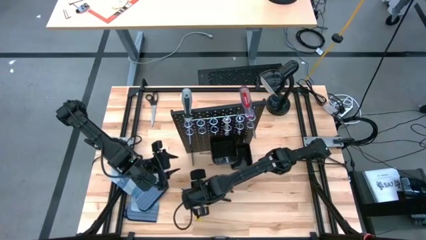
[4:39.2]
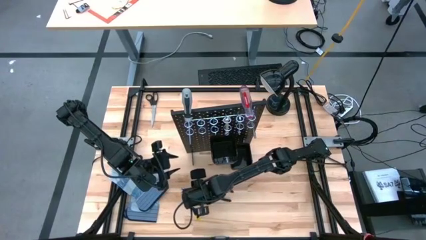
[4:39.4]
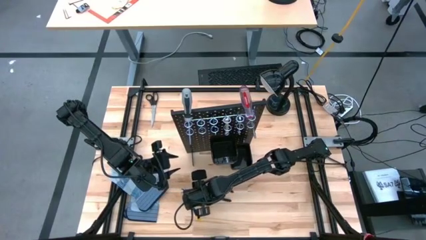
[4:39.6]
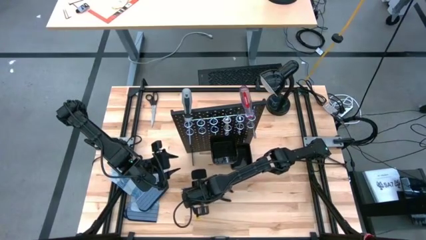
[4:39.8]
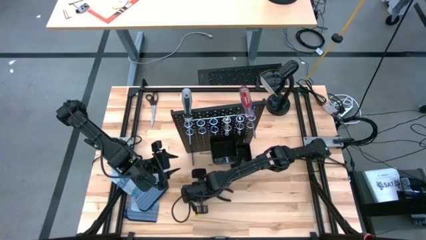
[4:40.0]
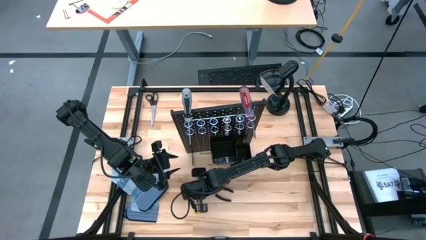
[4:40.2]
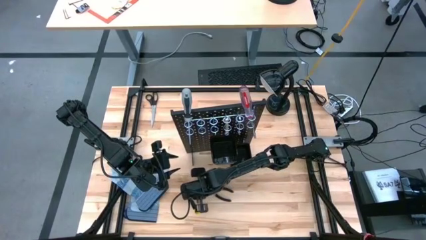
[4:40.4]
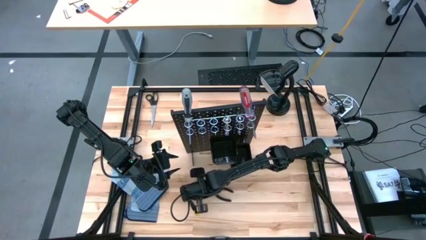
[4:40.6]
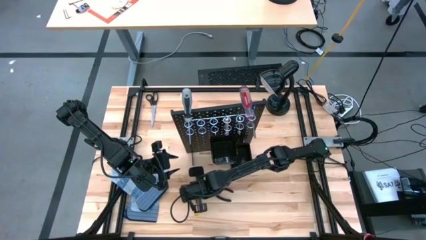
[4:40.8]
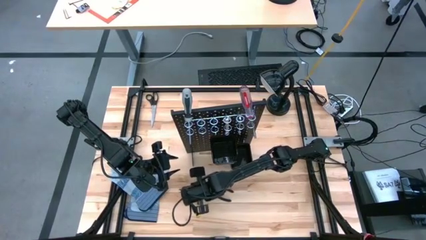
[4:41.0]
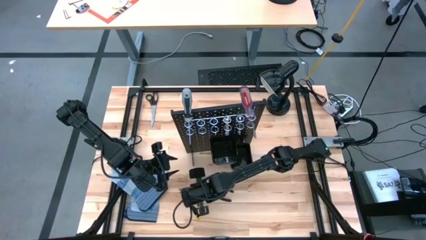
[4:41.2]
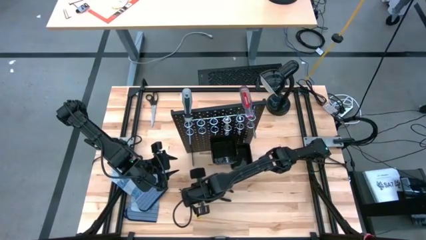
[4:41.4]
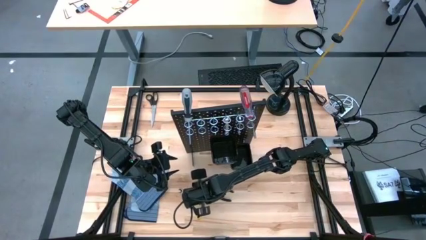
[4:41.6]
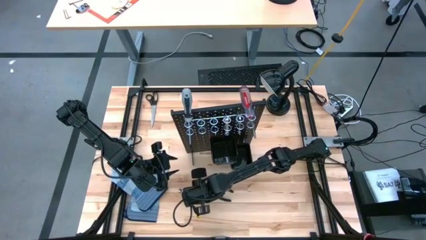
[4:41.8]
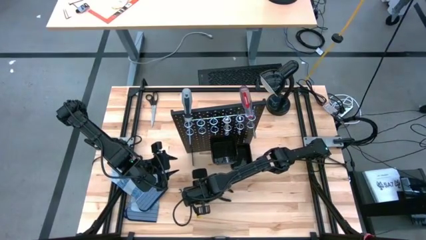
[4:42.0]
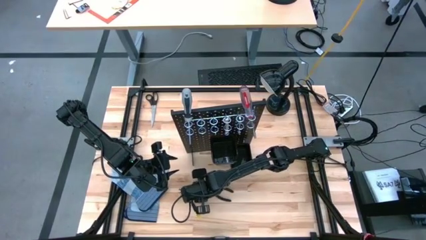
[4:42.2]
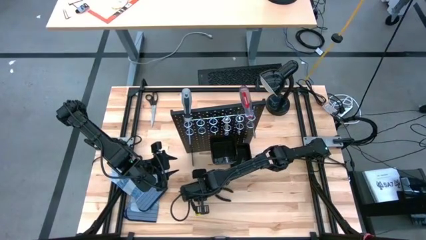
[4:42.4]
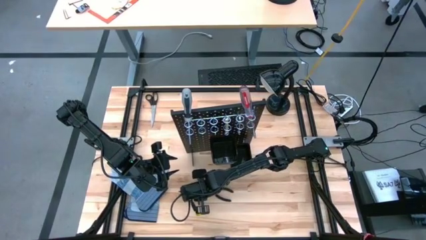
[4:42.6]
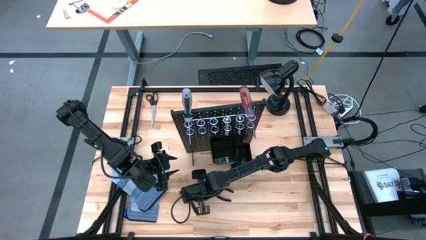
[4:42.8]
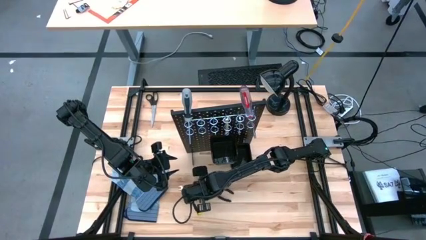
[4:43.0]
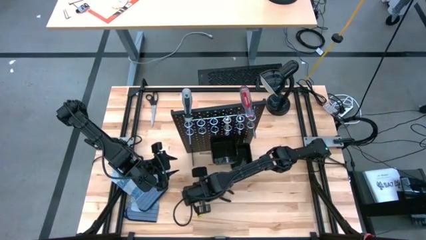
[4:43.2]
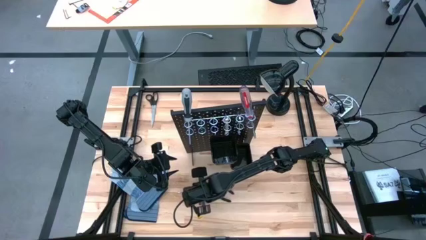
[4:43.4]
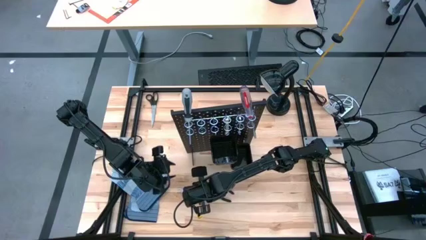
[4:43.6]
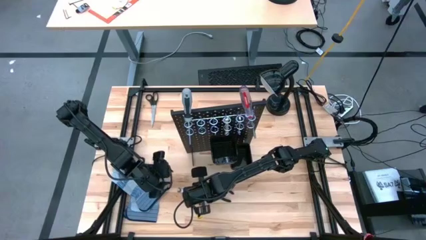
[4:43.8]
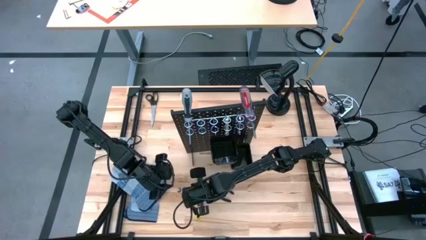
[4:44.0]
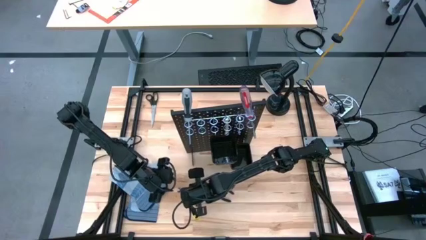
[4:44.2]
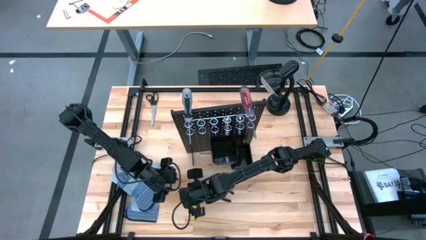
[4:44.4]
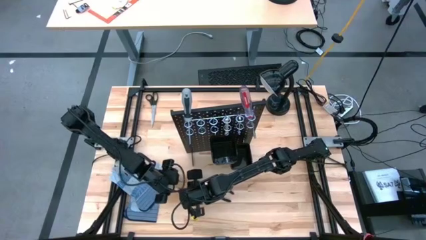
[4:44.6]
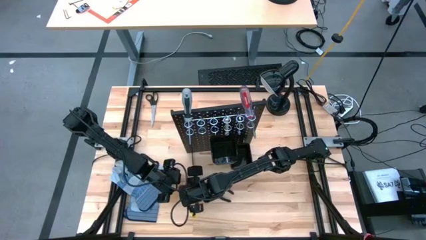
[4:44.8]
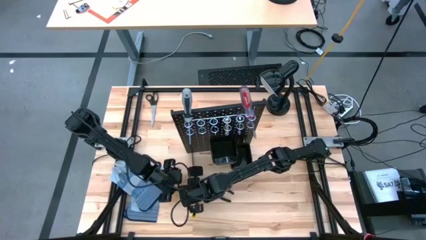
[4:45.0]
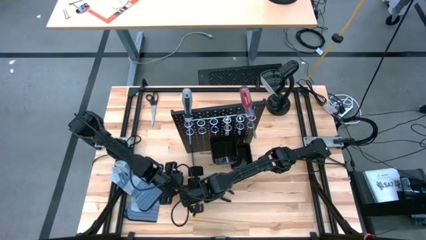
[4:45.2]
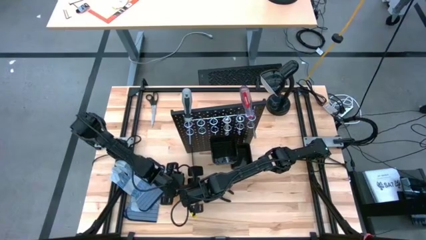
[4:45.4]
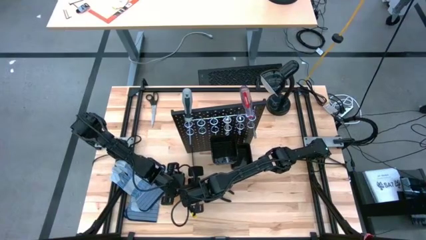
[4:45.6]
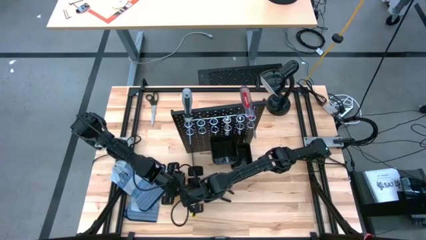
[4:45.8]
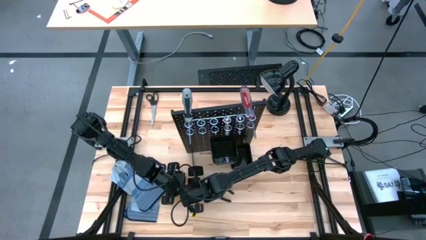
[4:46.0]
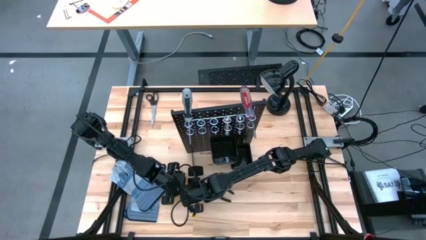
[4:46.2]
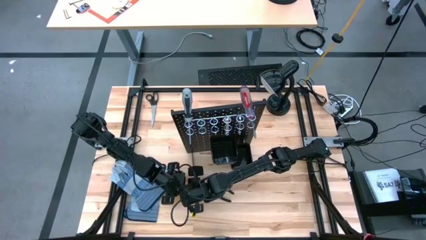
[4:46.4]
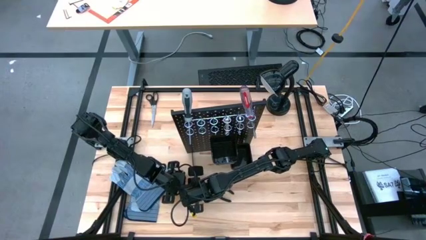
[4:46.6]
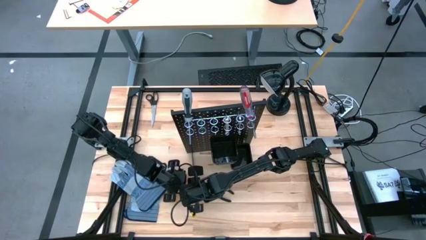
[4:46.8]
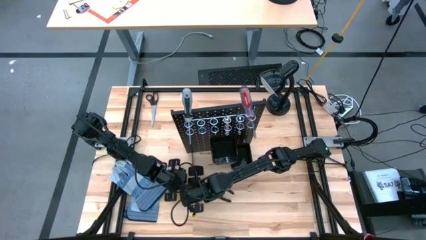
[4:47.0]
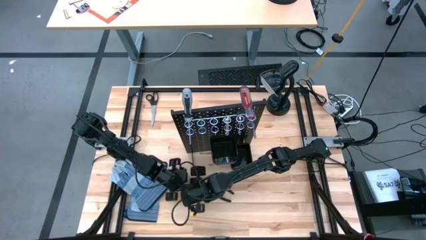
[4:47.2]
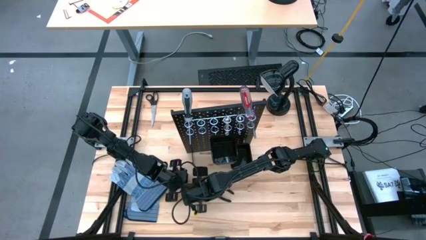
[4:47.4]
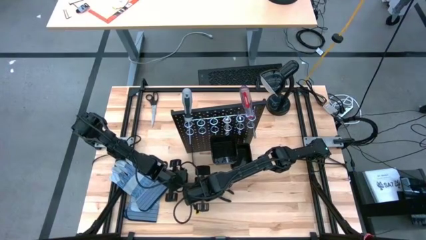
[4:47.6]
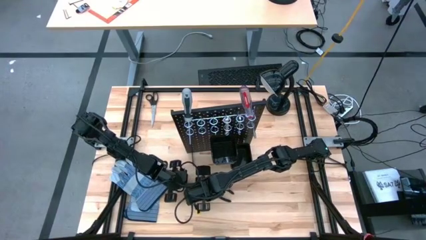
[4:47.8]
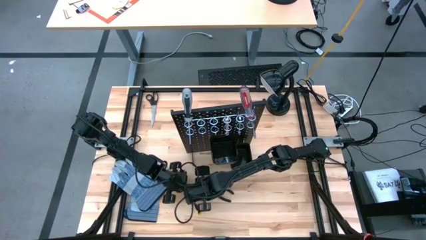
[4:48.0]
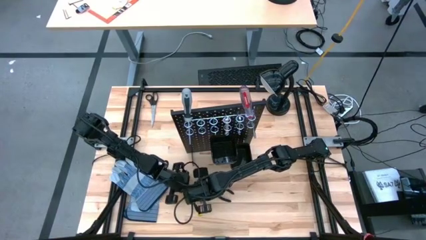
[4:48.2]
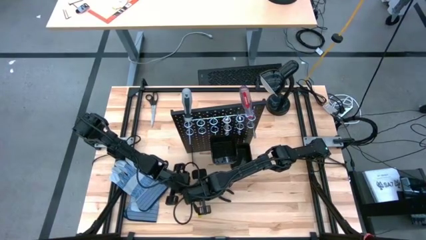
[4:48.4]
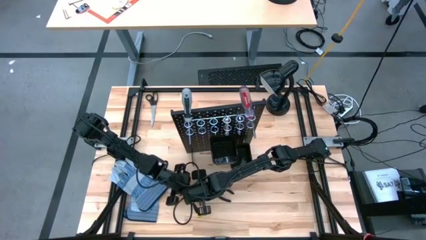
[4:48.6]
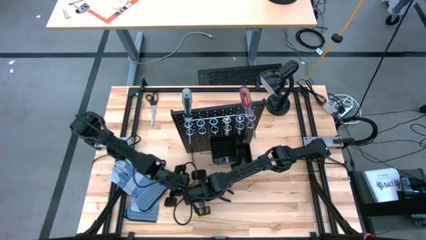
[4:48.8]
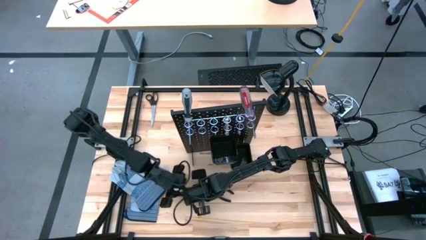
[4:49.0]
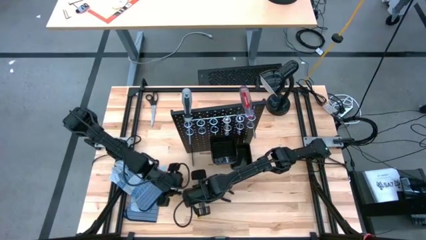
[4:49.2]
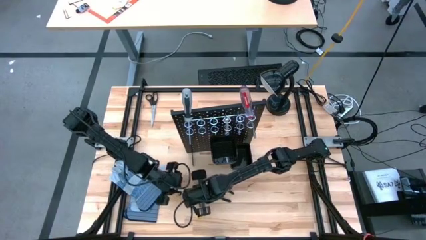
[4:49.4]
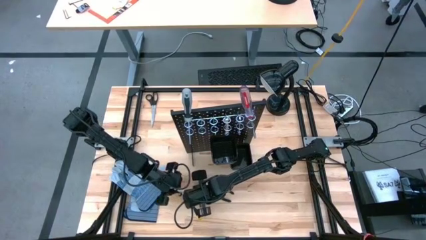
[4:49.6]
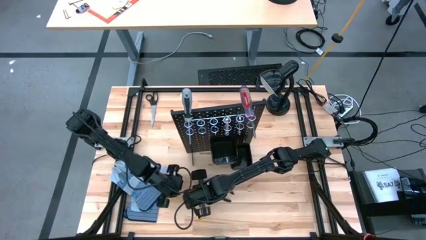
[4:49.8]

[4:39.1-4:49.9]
Task: Hang tools onto peg board
Hang the silver wrench on the black peg board
